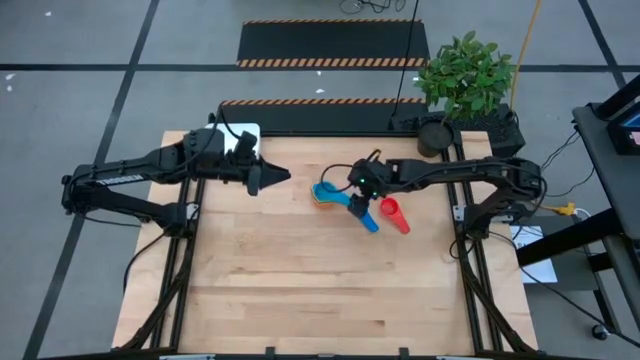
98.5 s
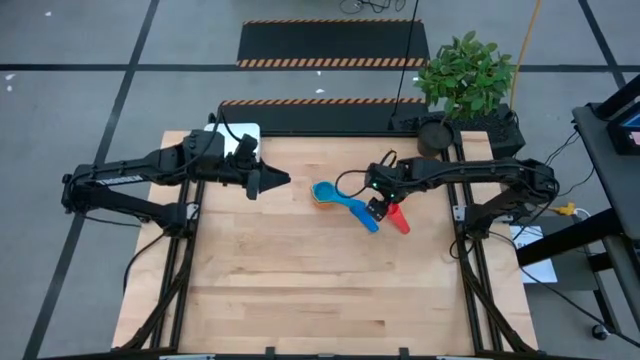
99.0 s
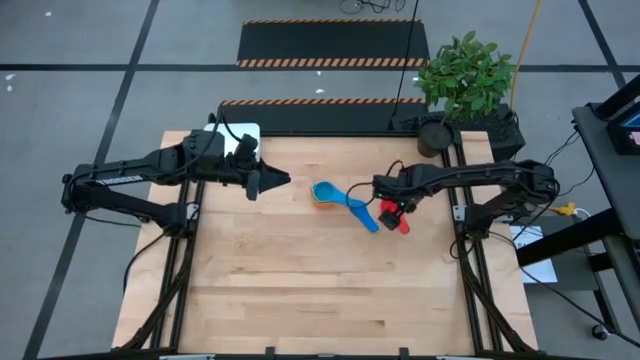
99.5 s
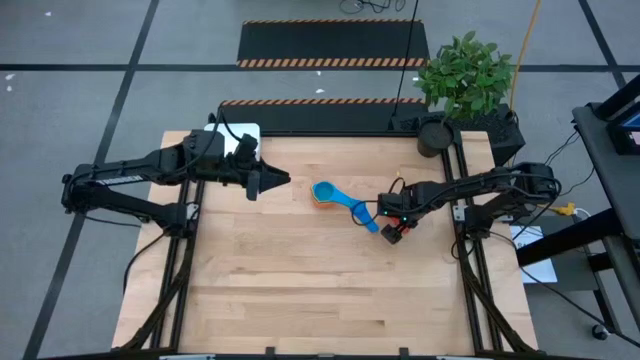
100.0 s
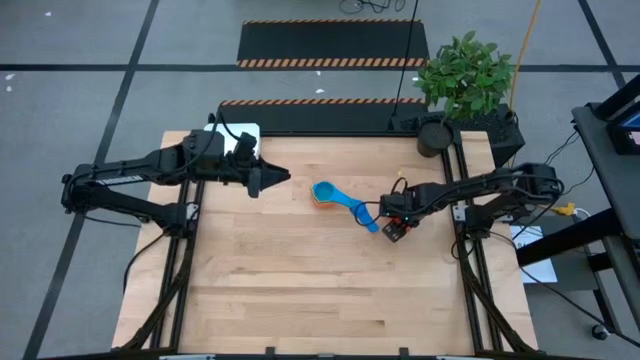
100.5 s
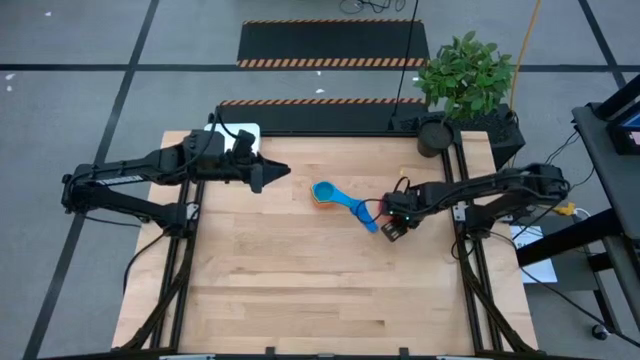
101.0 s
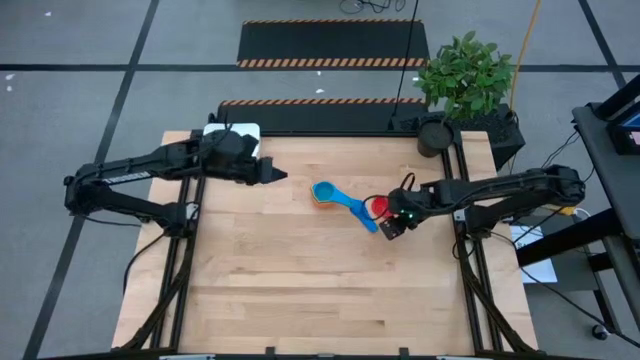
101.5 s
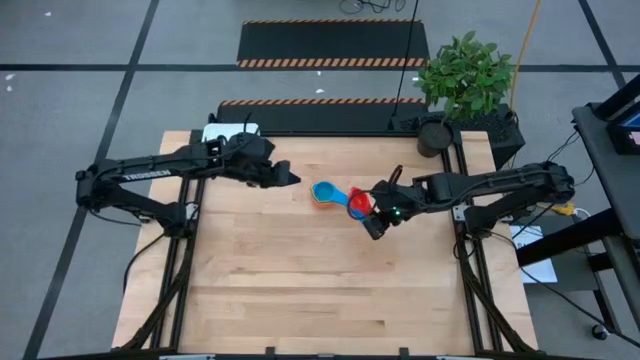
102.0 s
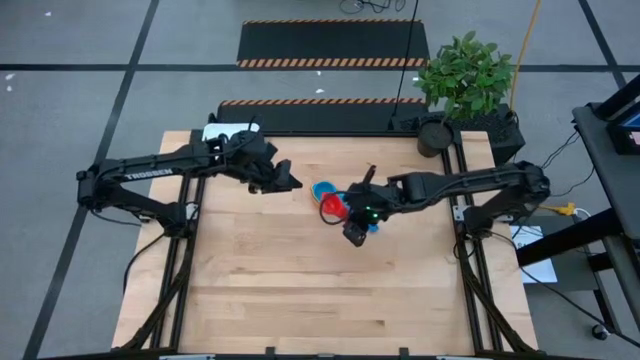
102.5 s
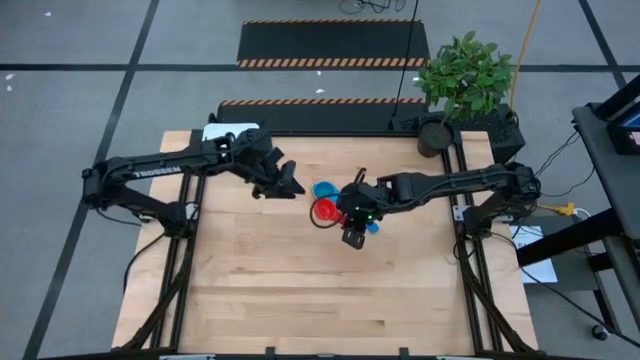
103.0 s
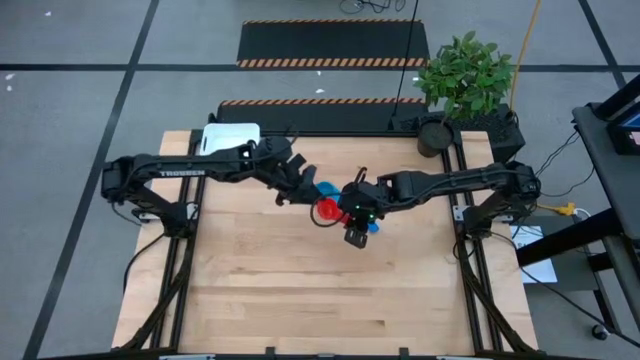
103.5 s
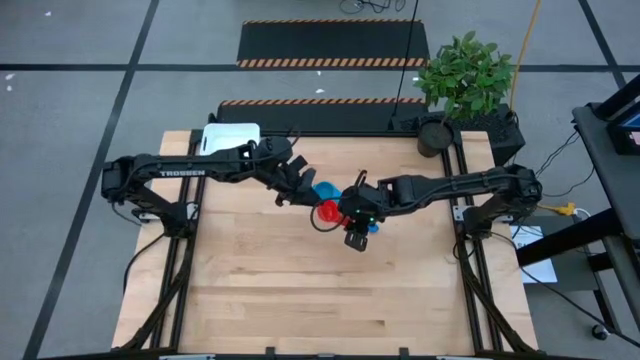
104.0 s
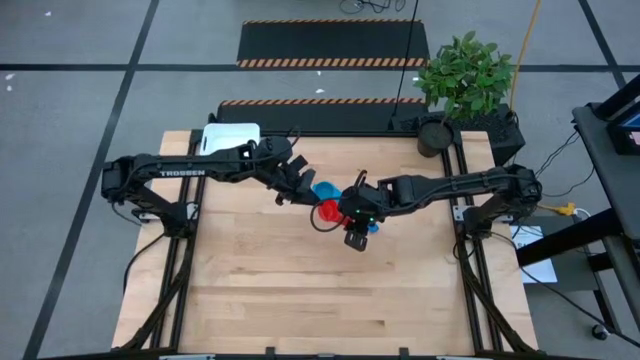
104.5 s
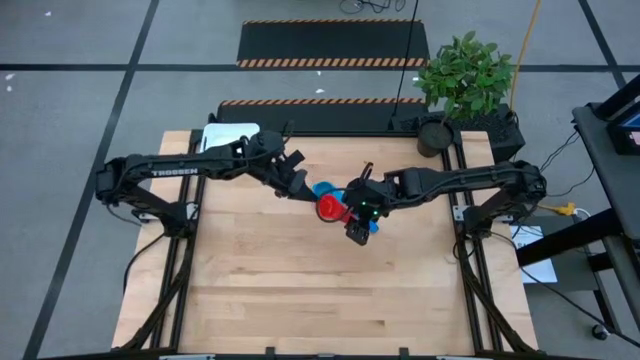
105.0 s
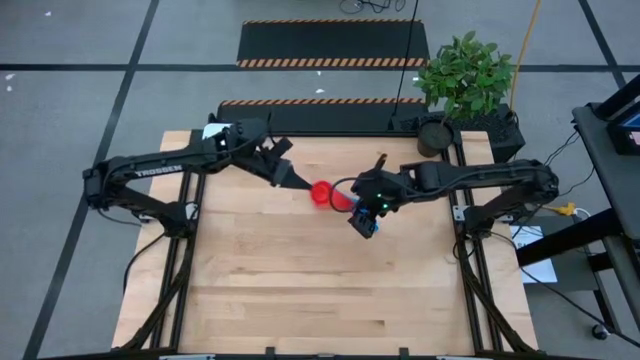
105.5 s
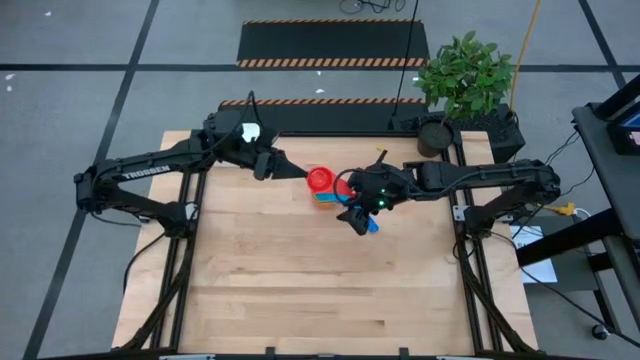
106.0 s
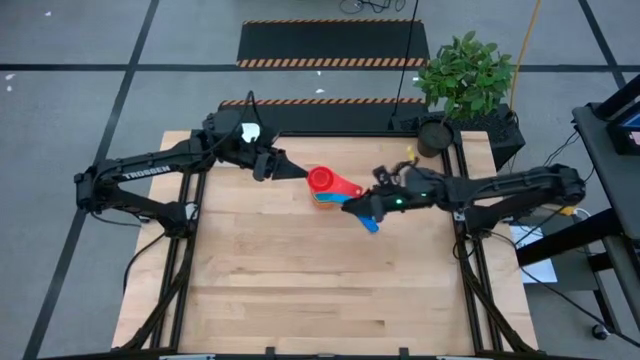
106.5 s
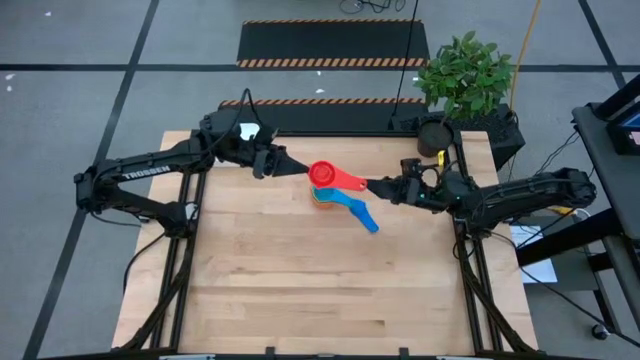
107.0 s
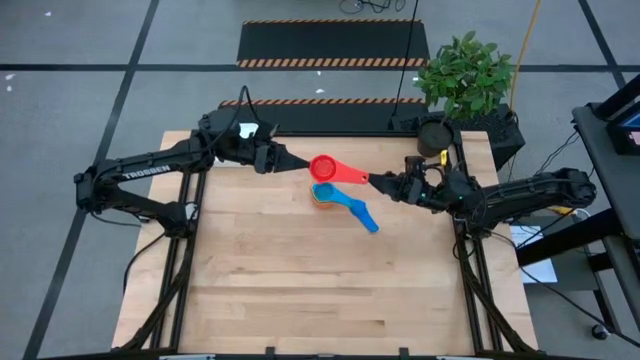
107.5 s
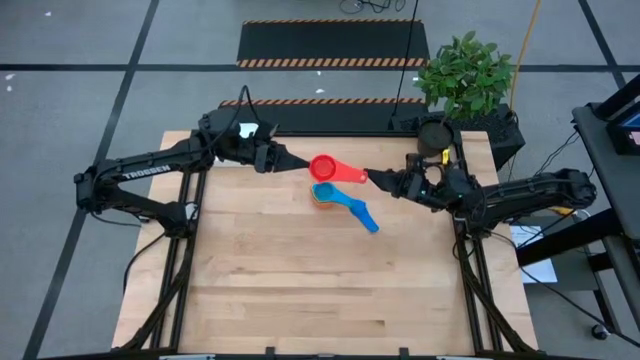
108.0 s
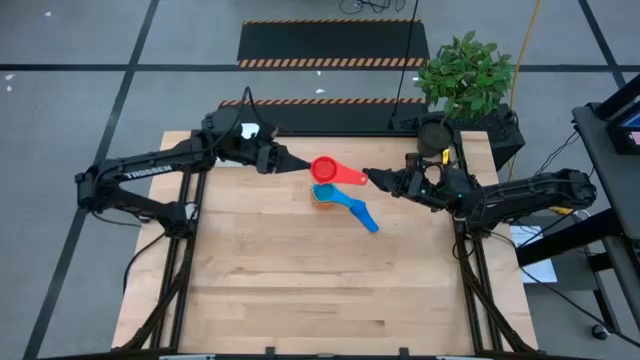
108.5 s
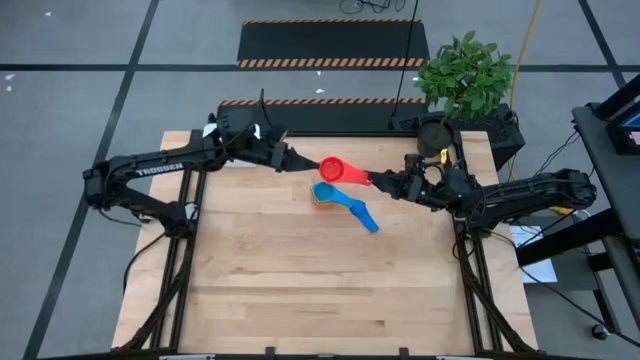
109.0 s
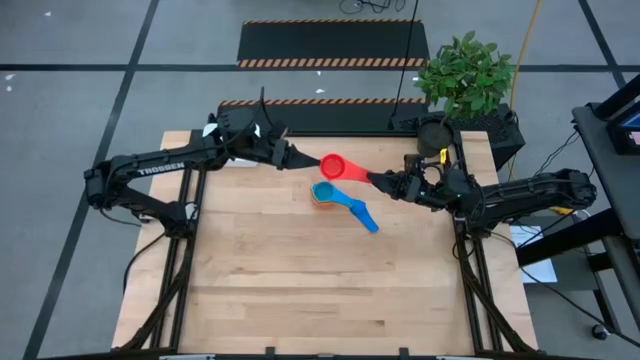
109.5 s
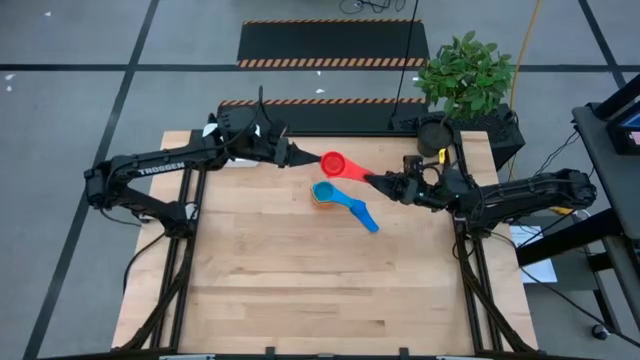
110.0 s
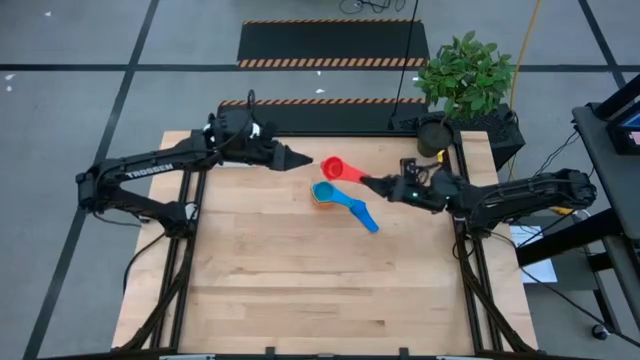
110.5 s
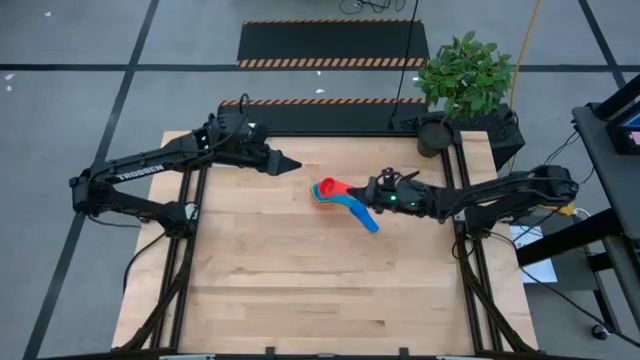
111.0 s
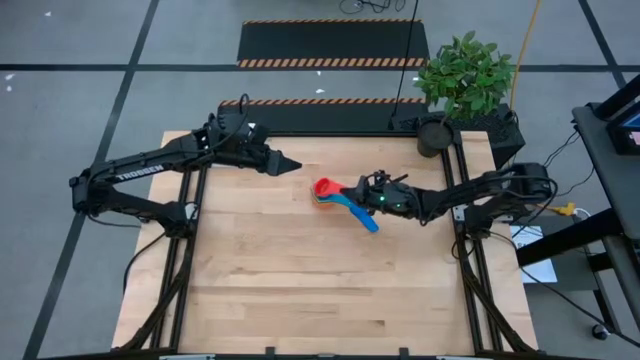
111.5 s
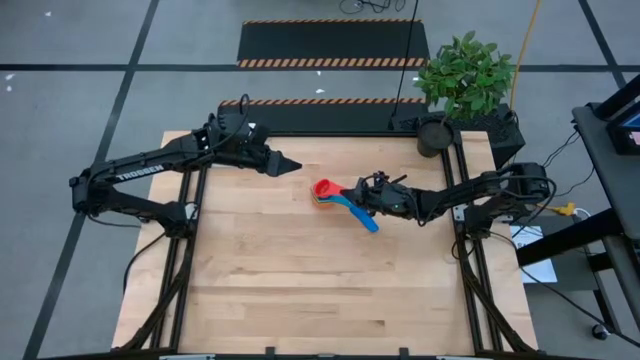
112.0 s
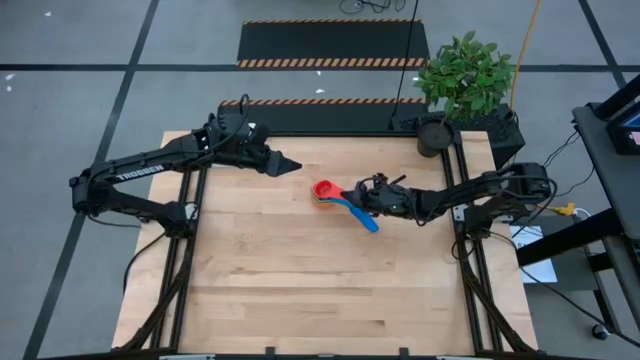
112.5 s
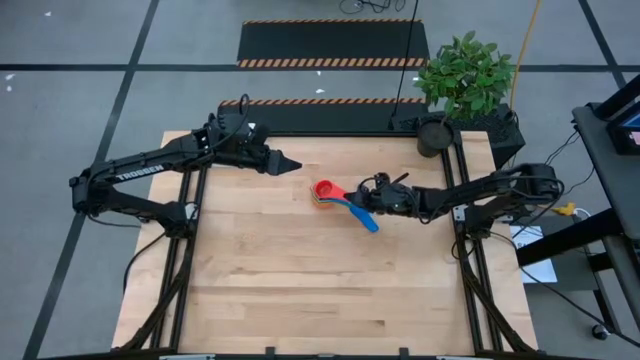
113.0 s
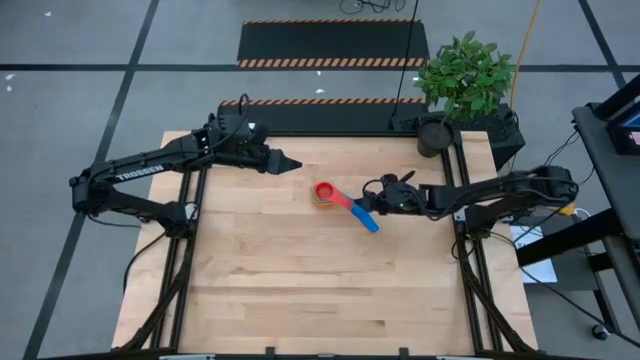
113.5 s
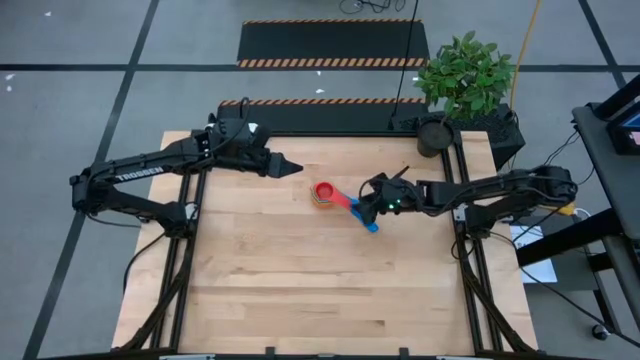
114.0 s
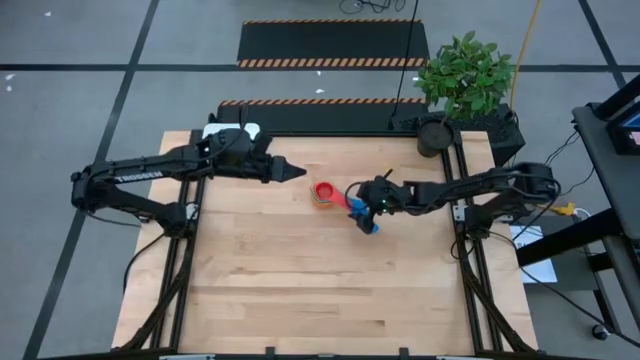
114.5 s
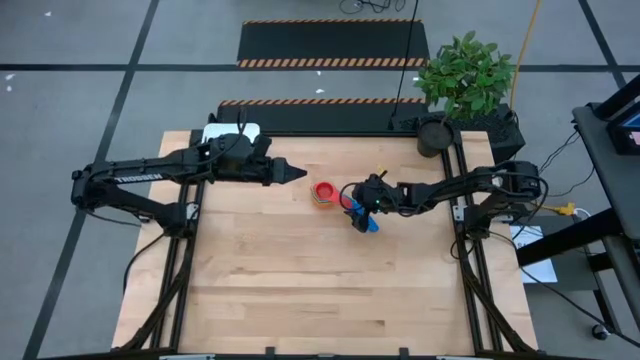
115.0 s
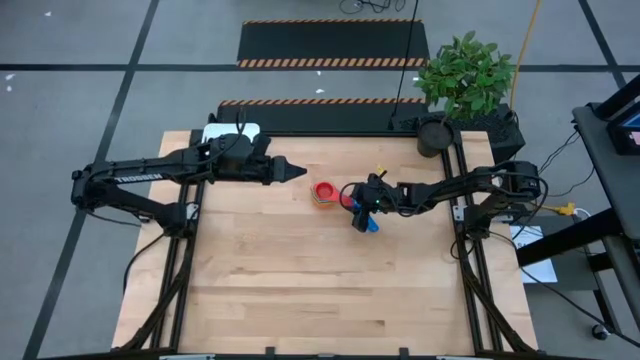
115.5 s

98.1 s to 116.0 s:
Task: Nest measuring cups in basket
Stack the red measuring cup into the light blue measuring cup

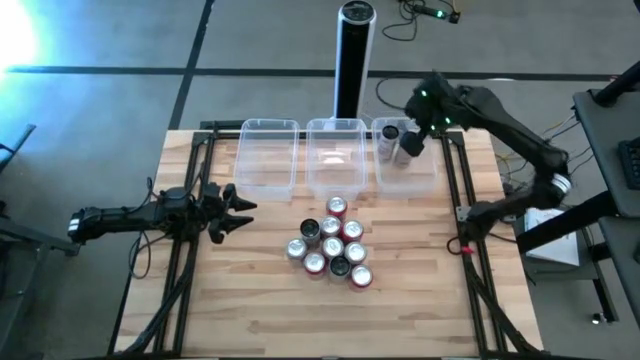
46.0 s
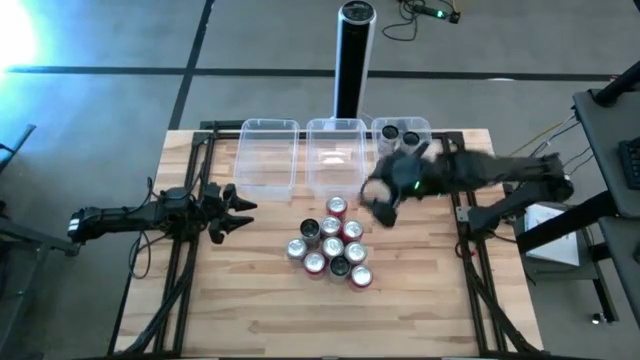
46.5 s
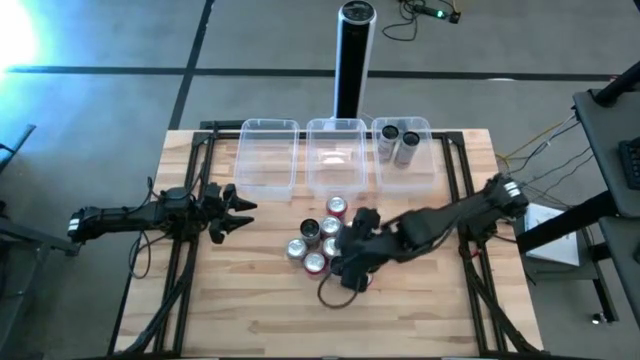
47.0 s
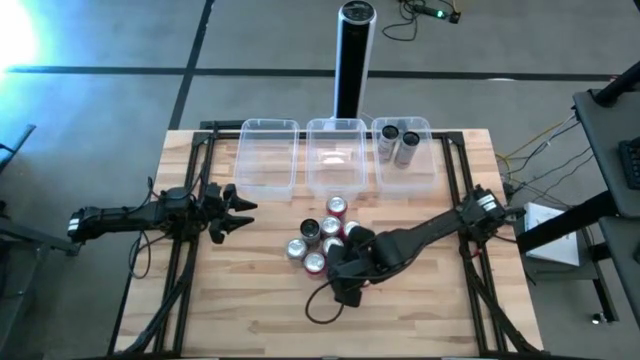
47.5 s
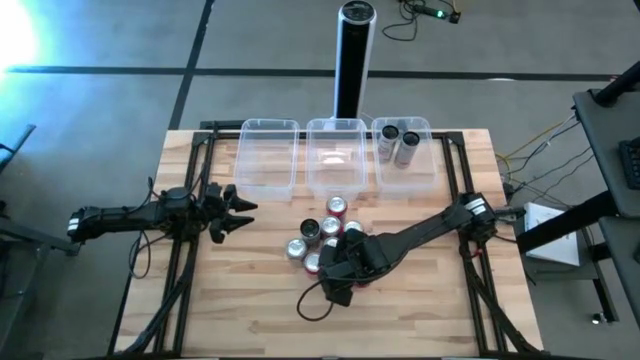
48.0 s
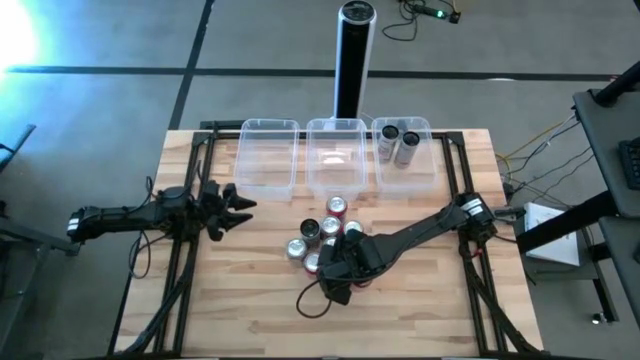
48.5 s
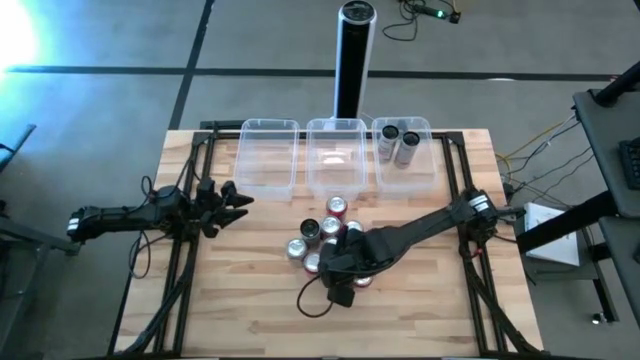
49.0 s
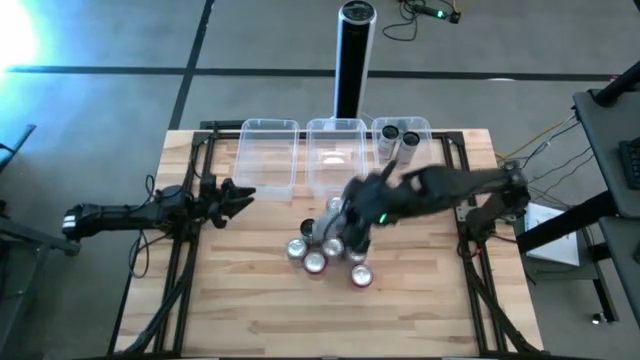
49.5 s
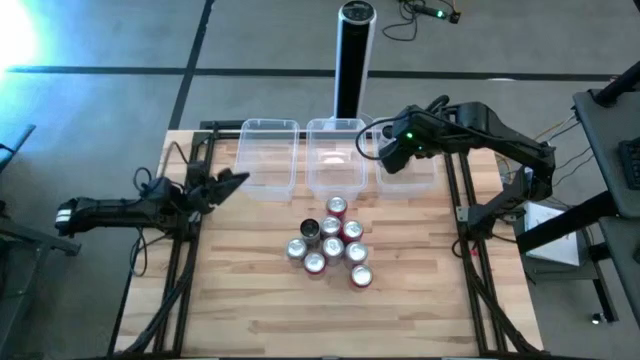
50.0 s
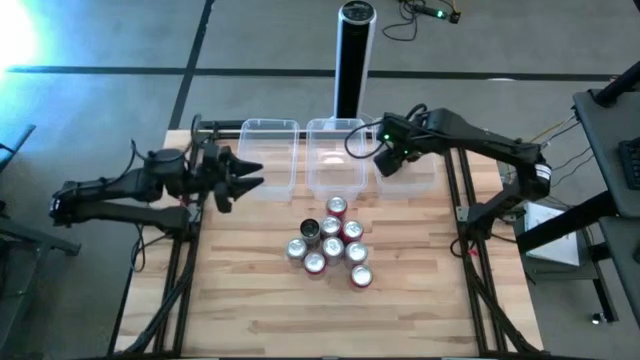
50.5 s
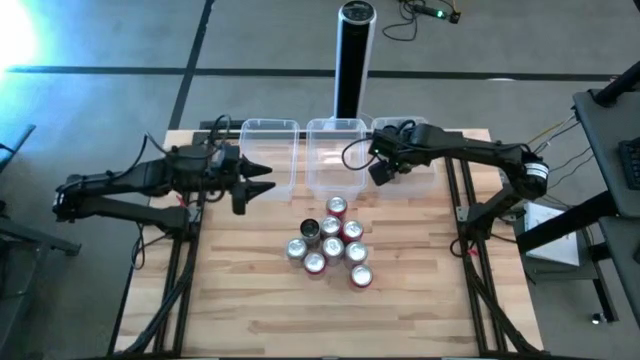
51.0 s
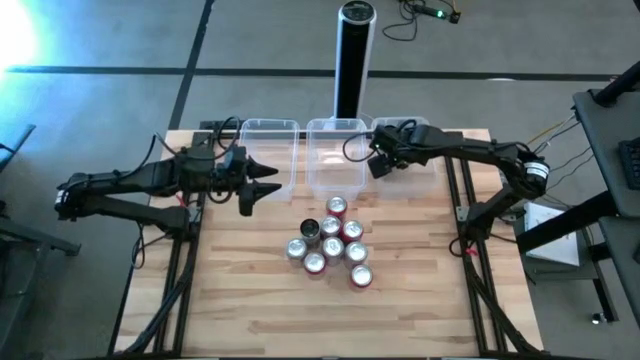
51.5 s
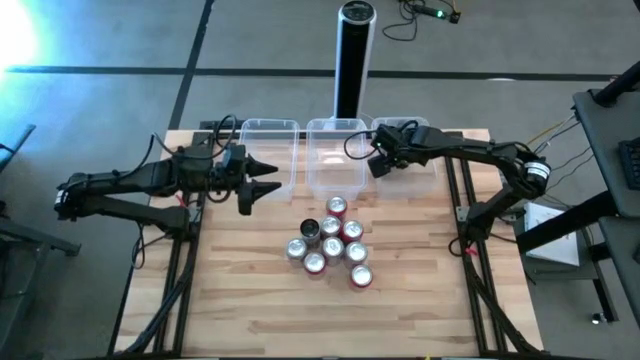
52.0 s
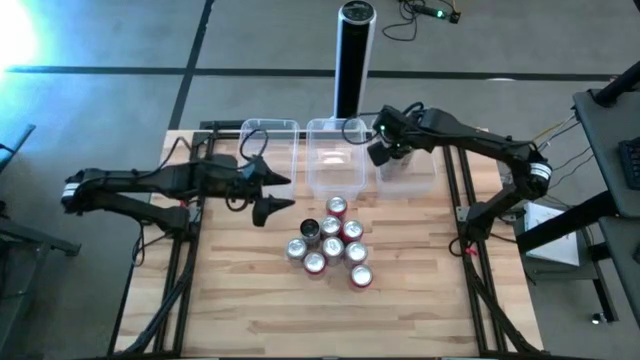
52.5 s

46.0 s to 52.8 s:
Task: Sort soda cans
Put the white-pink soda can into the right white bin
